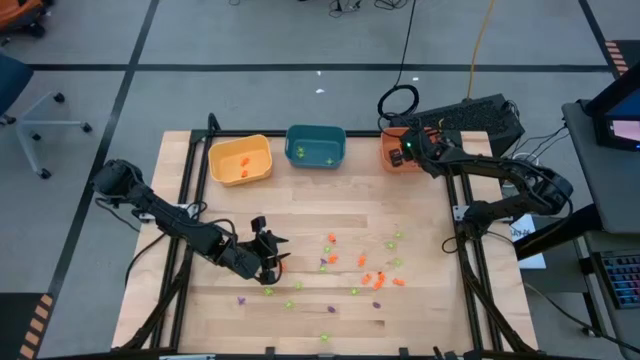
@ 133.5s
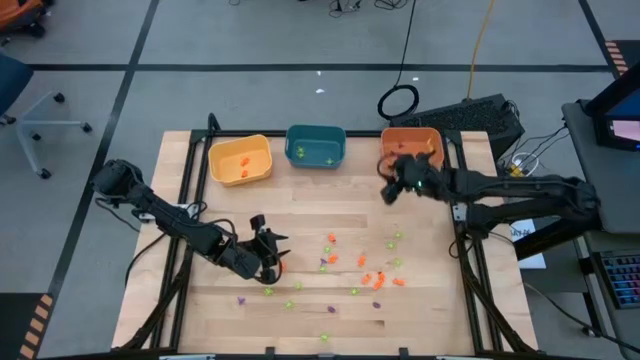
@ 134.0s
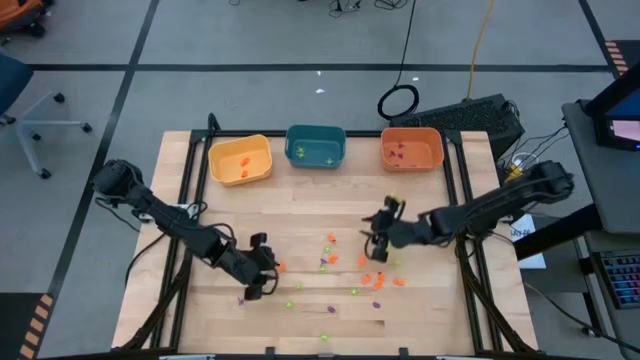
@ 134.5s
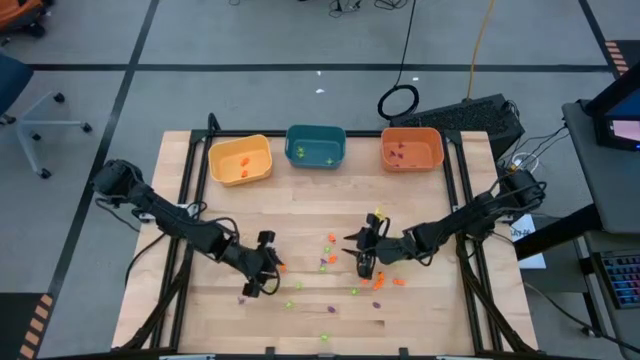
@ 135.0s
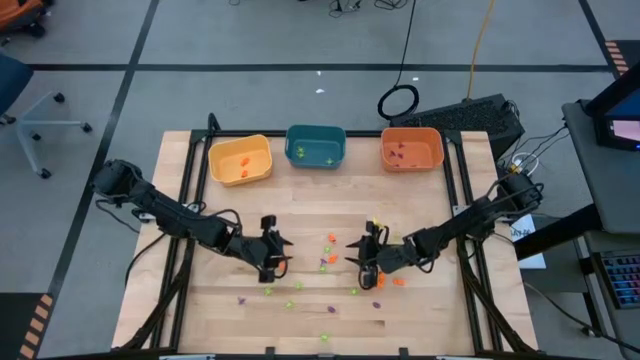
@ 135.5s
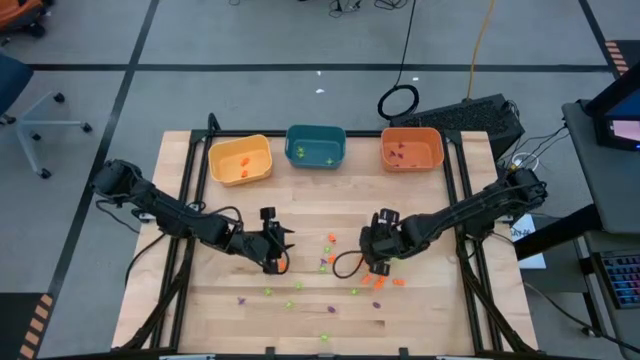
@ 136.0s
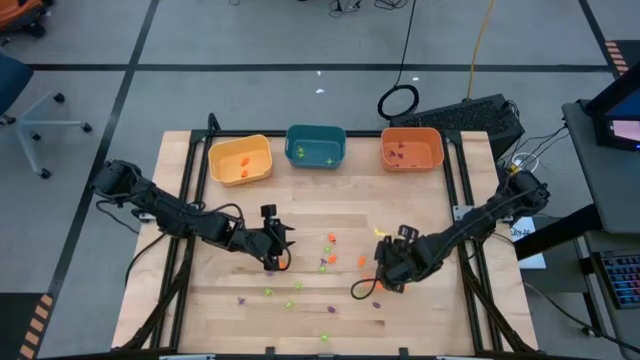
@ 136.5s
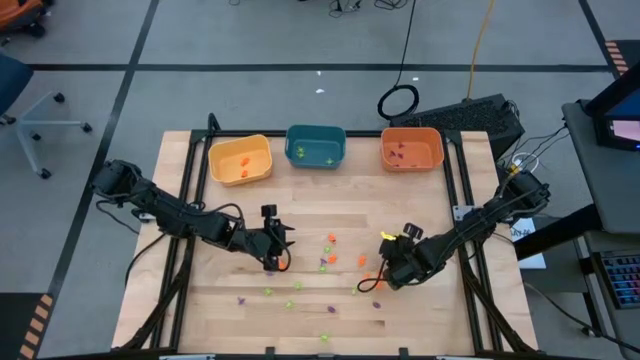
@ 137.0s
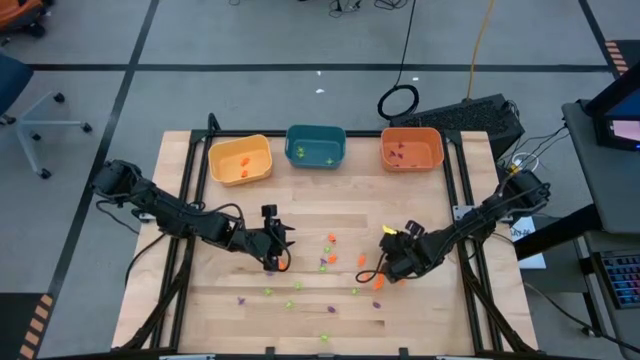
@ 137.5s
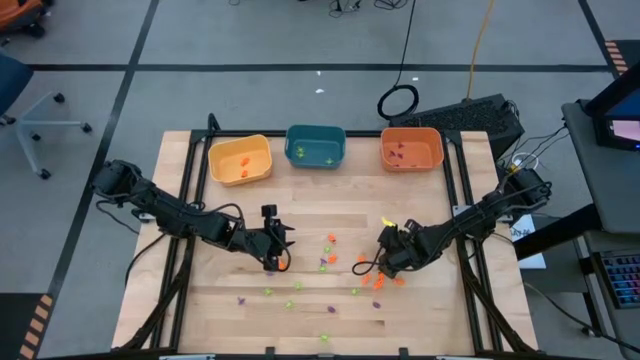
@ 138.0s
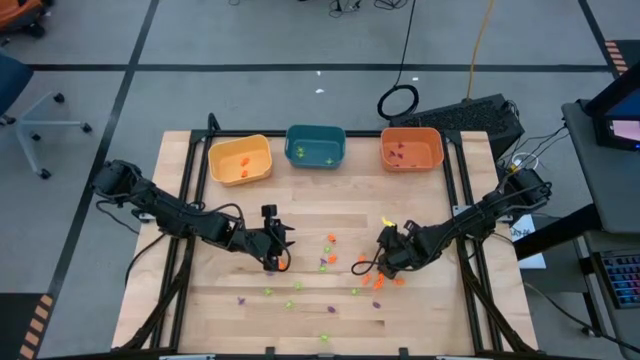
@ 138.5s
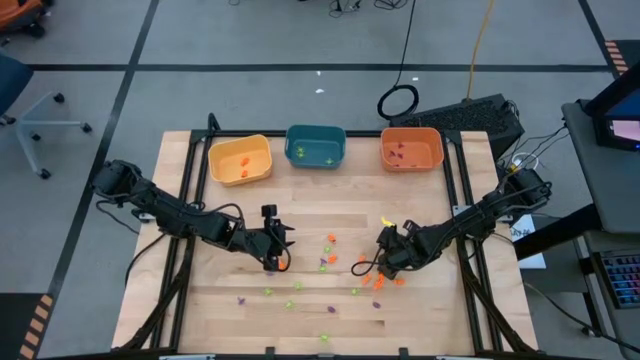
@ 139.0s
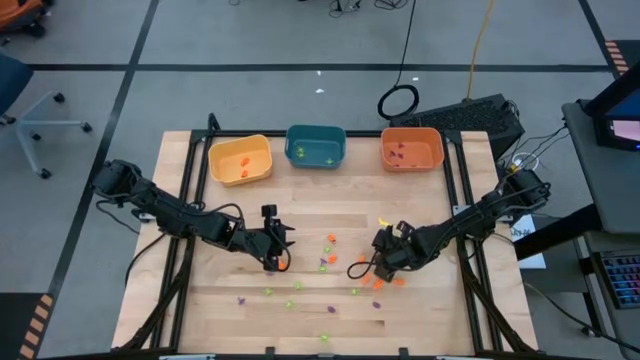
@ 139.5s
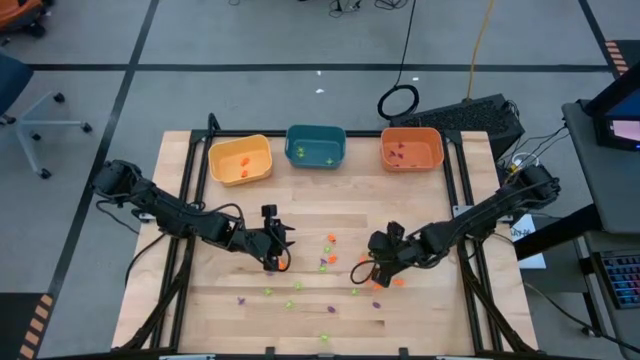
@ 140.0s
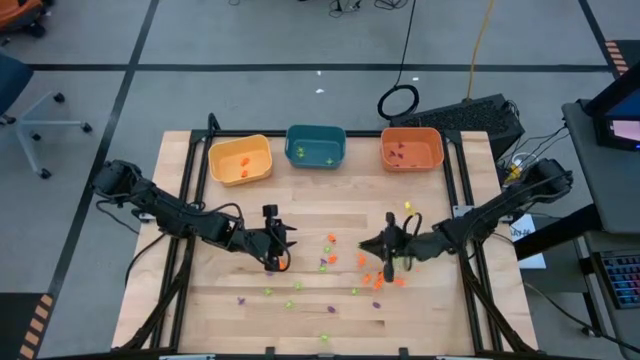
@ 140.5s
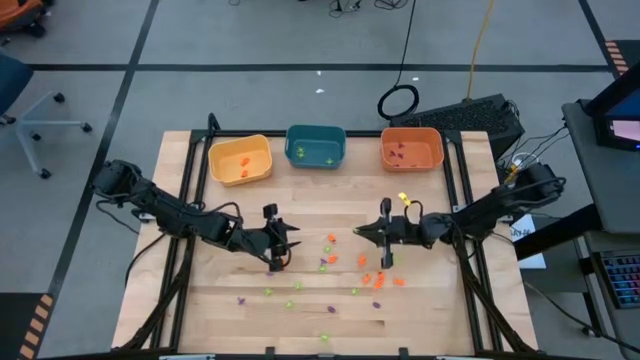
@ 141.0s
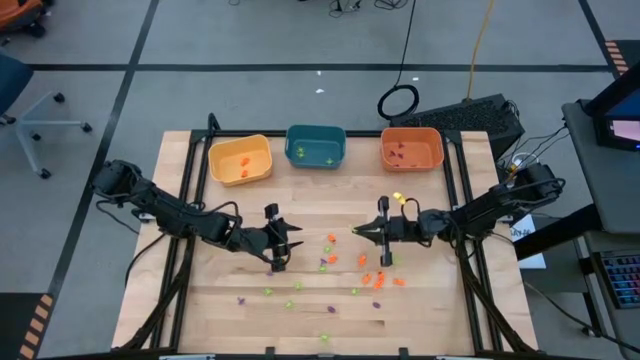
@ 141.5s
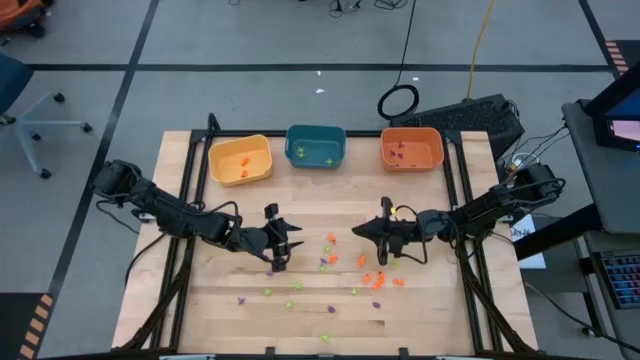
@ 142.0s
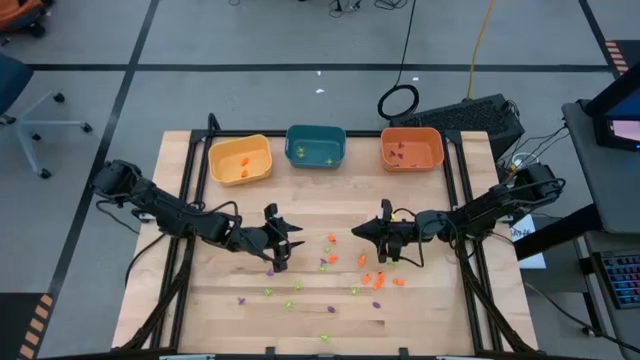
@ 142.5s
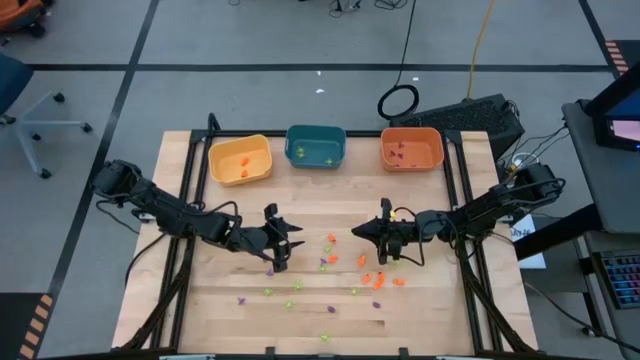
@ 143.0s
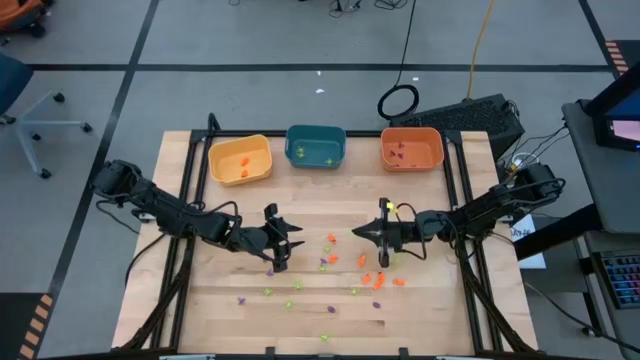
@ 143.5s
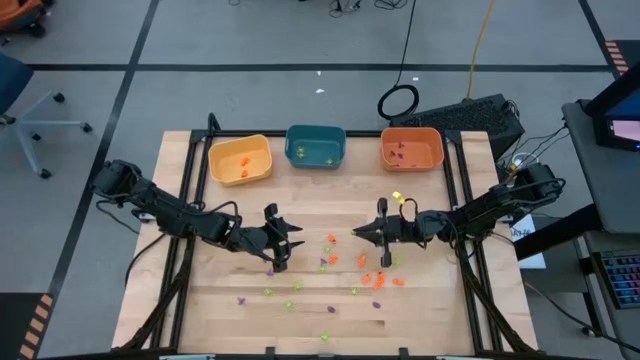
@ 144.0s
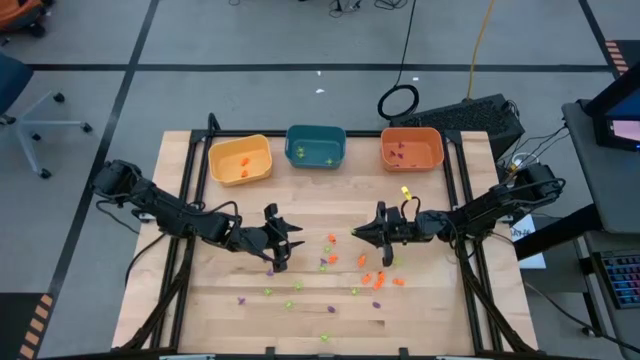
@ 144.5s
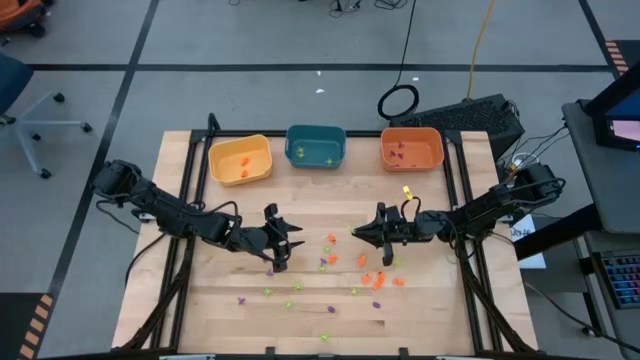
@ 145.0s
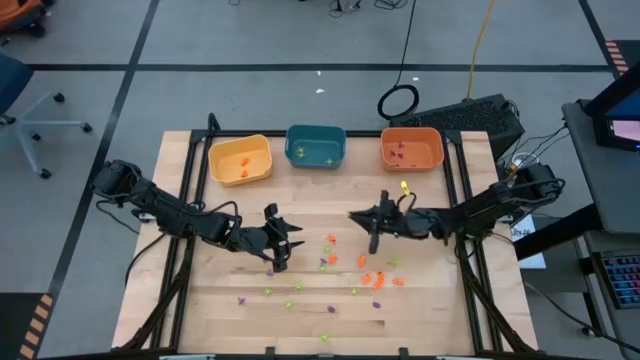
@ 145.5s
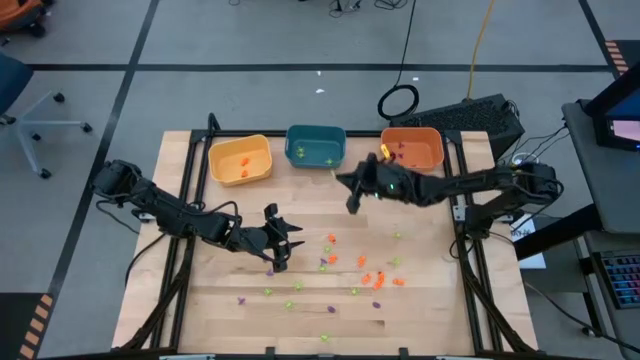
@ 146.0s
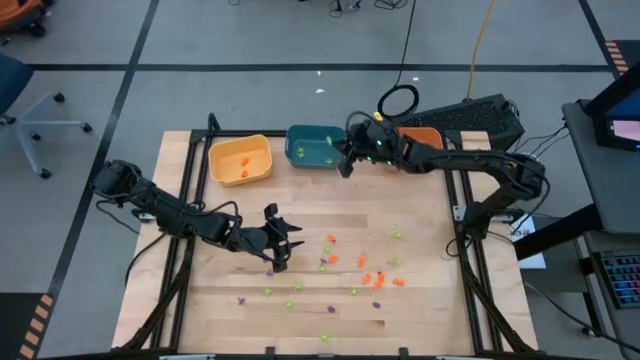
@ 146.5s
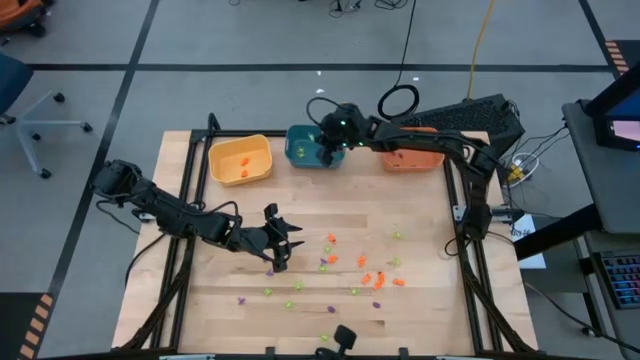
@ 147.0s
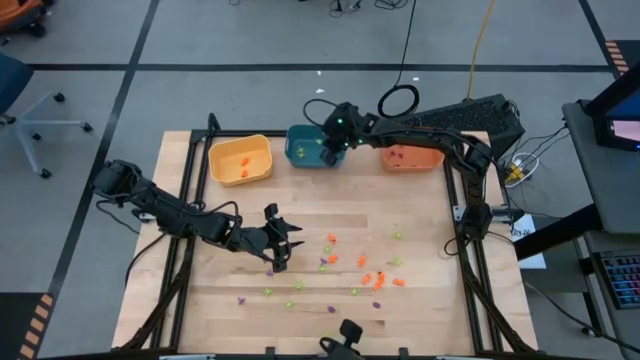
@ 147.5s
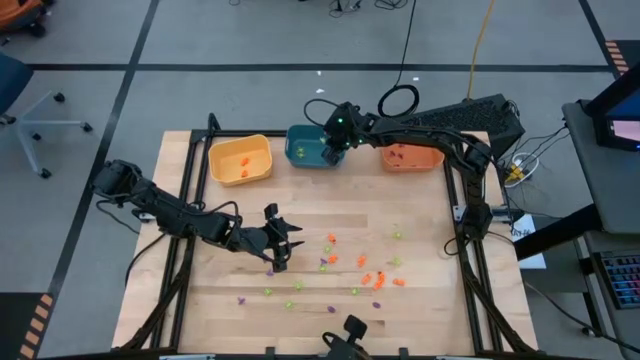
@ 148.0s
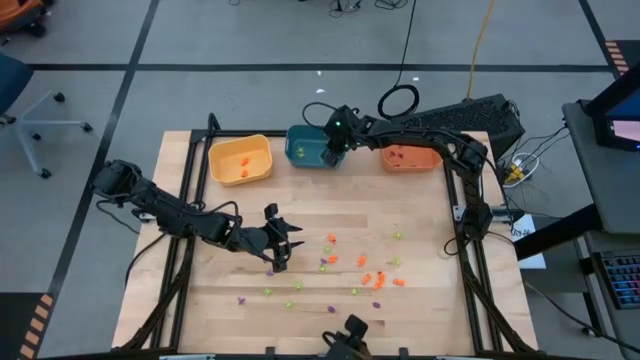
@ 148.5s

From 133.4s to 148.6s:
Task: Sort Halloween decoration
Put the green spider toy into the blue bin

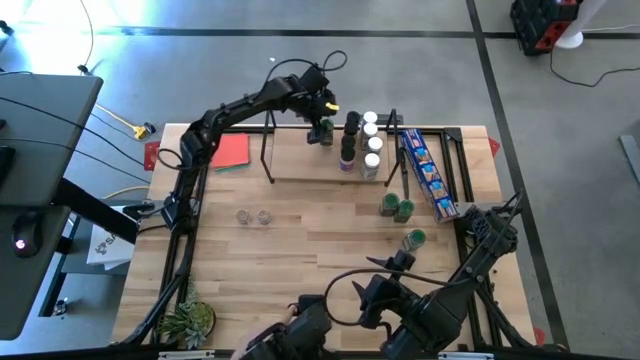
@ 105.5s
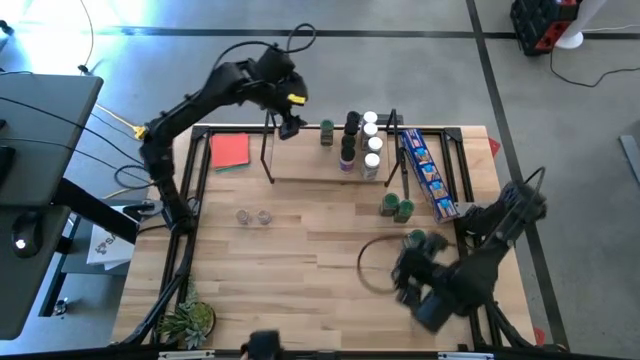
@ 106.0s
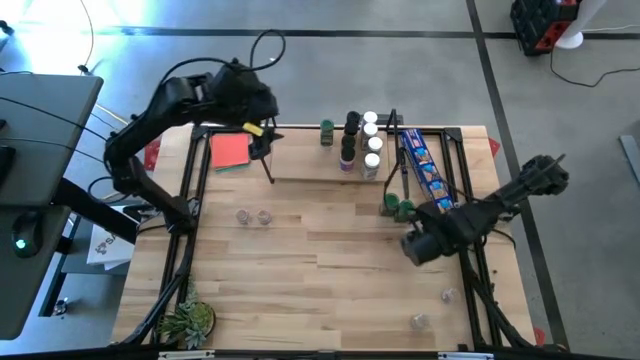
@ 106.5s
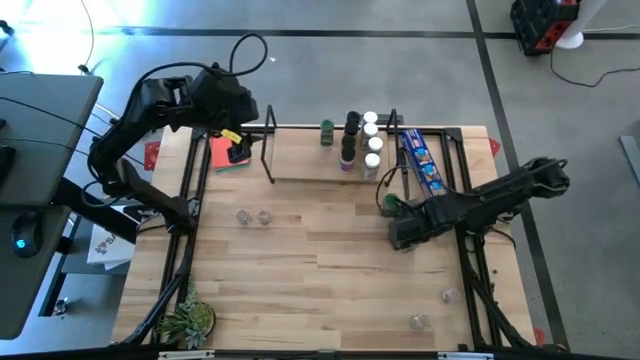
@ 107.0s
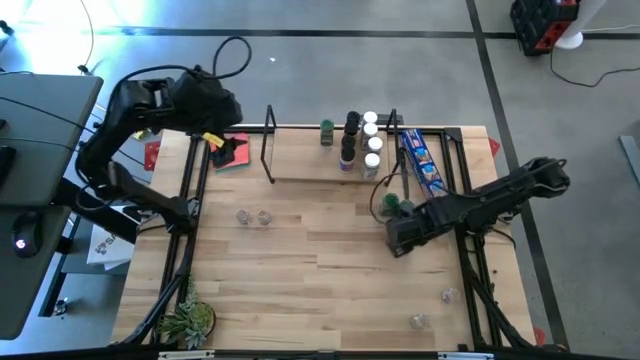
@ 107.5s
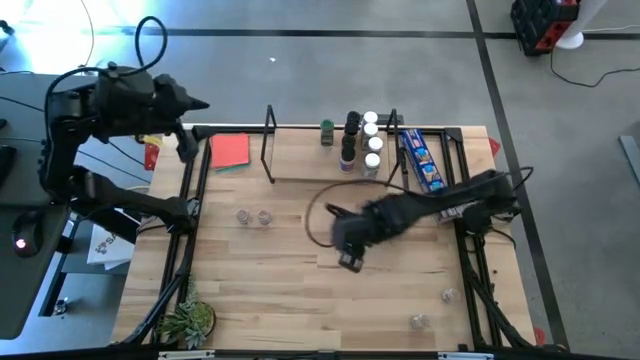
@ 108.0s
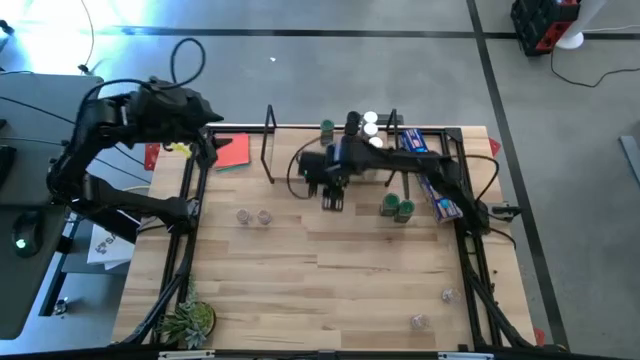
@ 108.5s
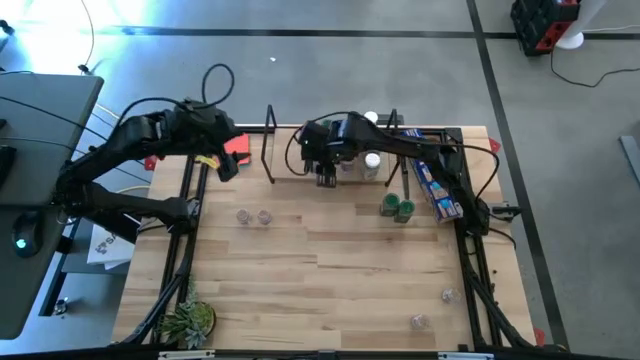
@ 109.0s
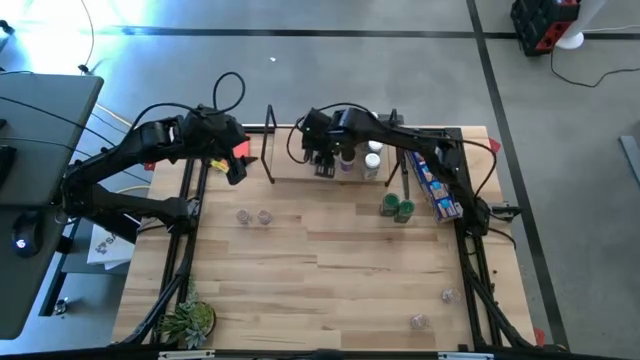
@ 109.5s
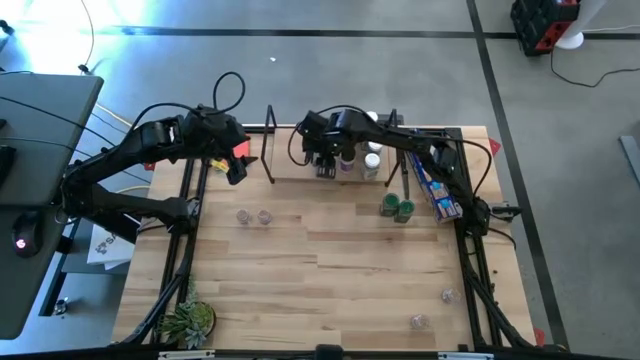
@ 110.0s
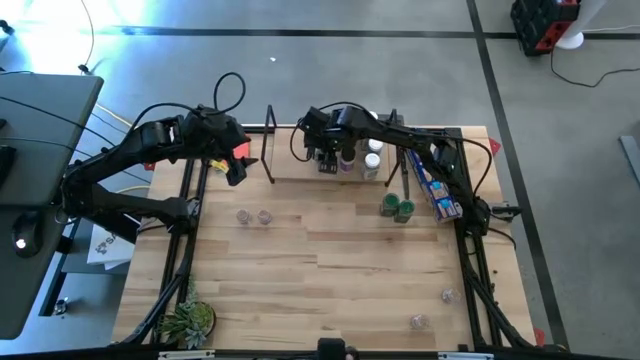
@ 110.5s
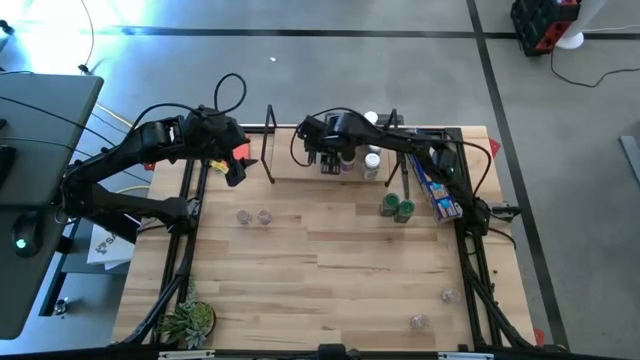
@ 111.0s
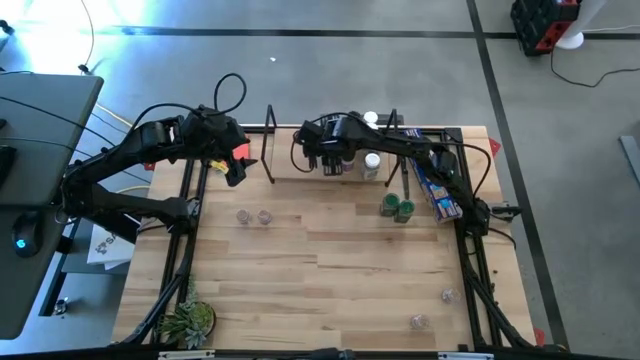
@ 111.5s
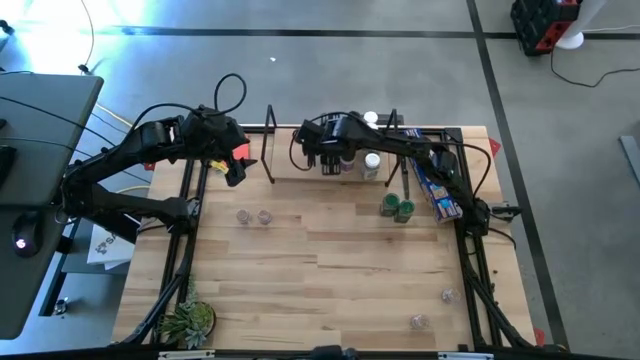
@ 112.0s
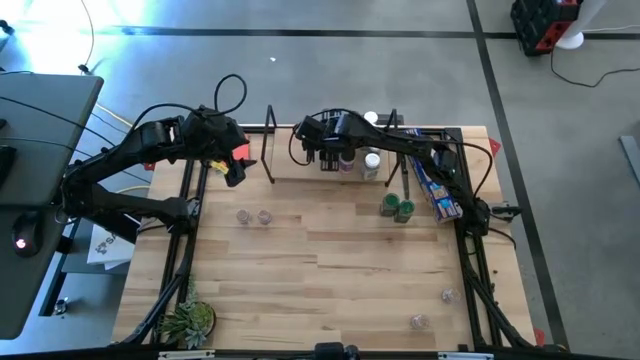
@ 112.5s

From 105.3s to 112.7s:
Task: Shelf spices
Put the bottom green seasoning bottle on the shelf aligned with the other green seasoning bottle
